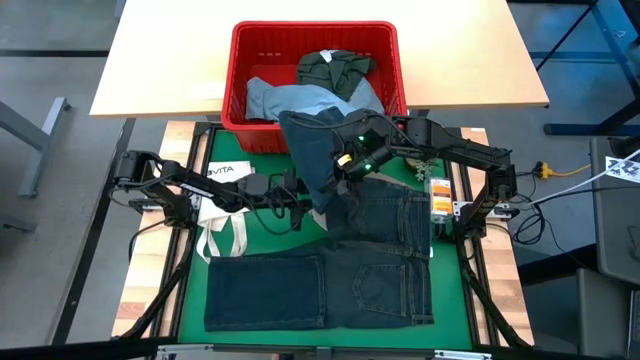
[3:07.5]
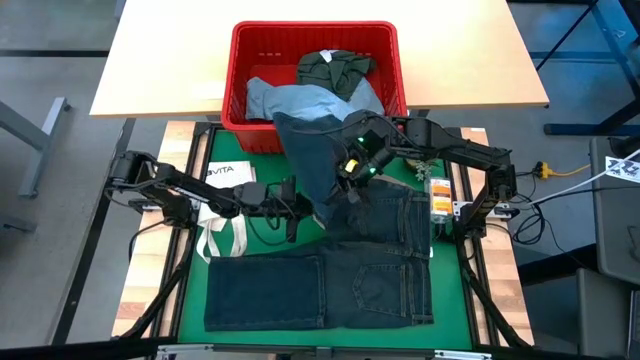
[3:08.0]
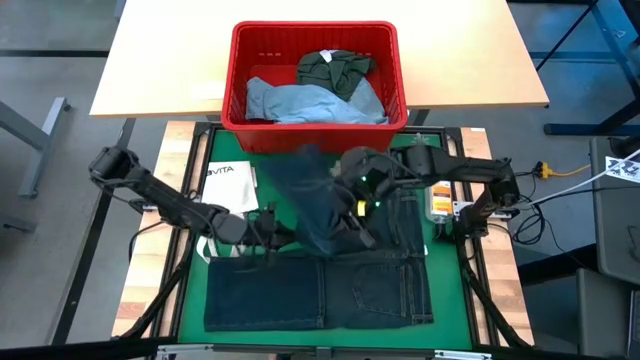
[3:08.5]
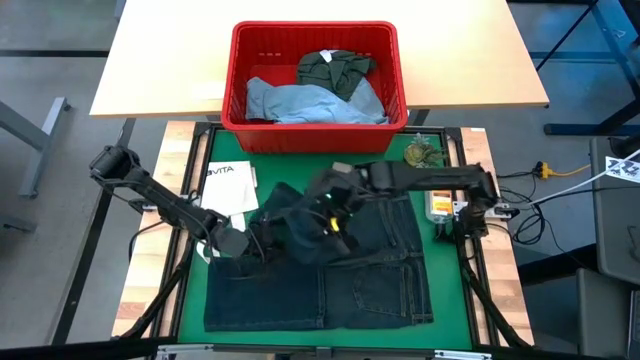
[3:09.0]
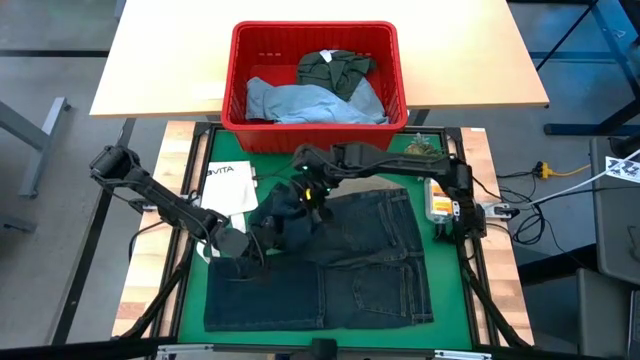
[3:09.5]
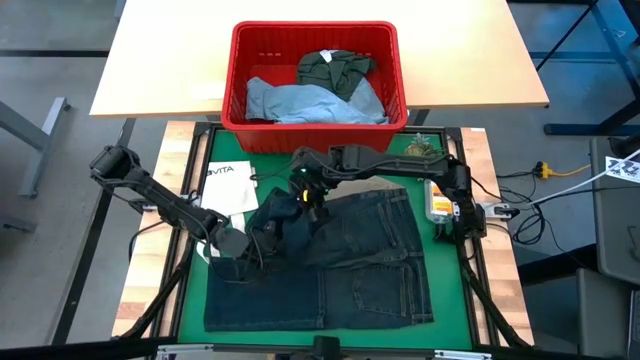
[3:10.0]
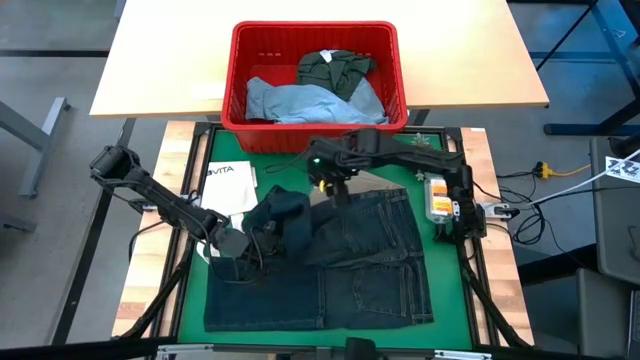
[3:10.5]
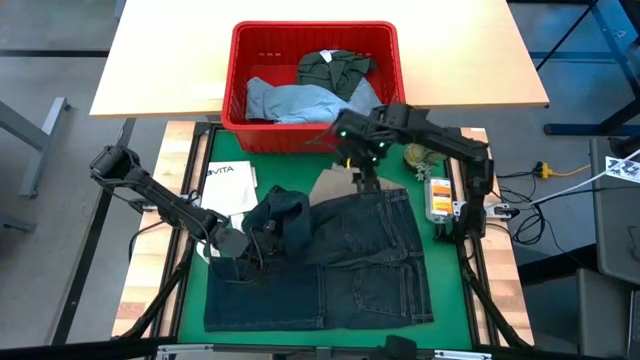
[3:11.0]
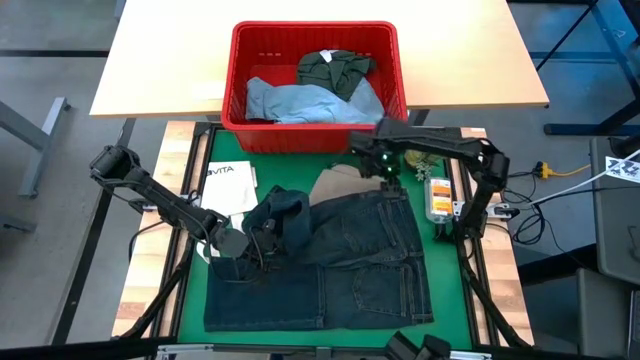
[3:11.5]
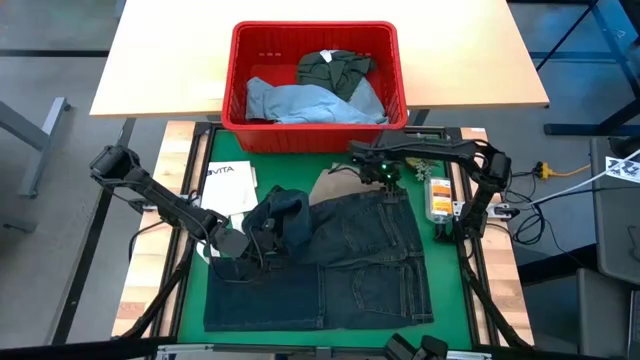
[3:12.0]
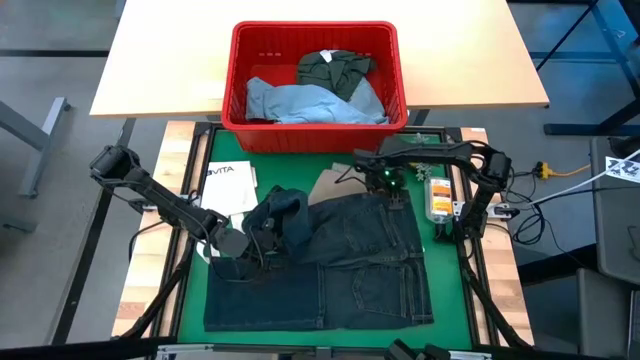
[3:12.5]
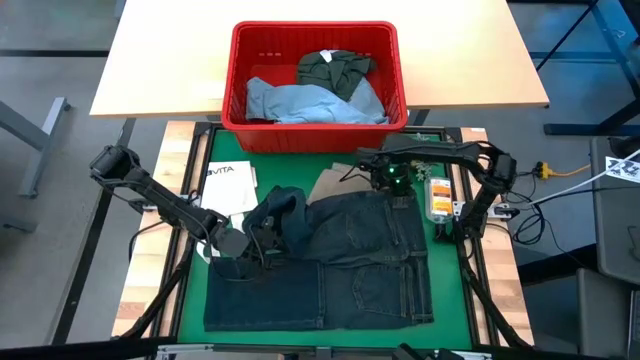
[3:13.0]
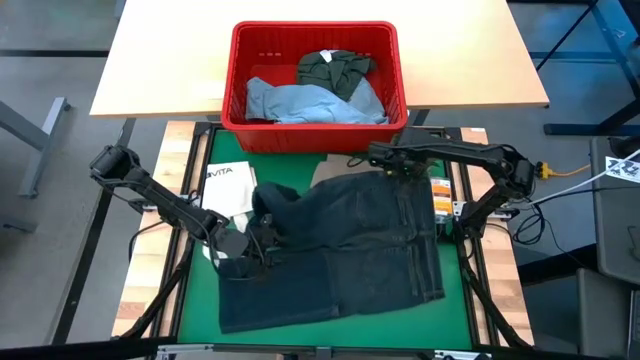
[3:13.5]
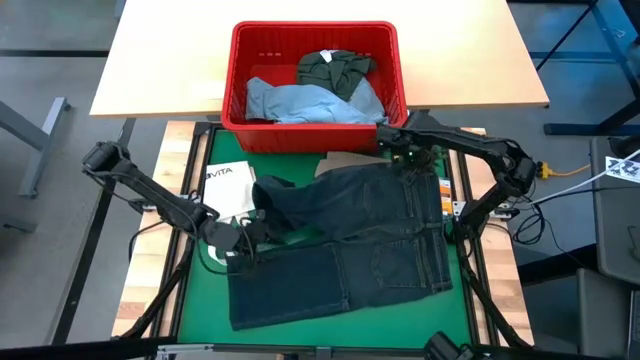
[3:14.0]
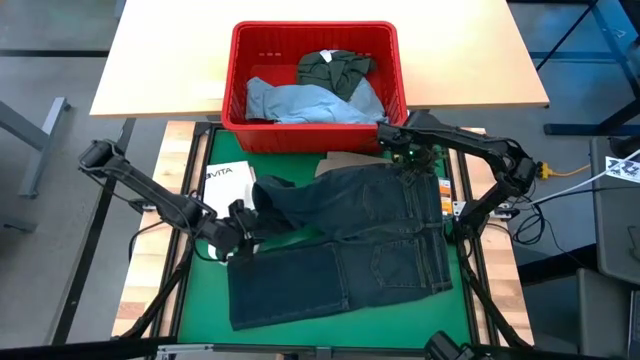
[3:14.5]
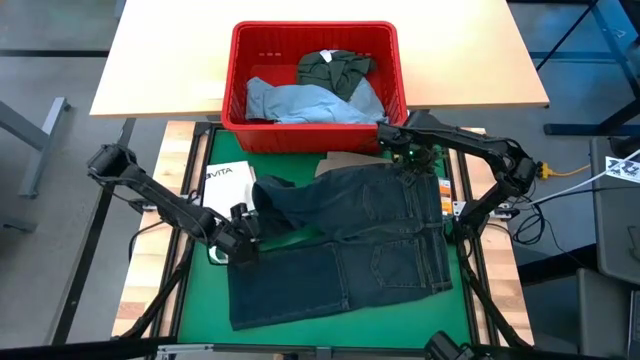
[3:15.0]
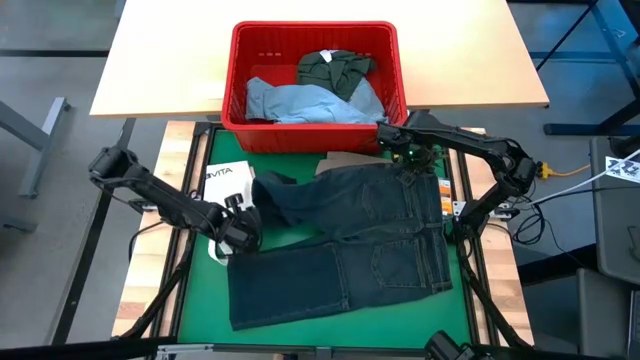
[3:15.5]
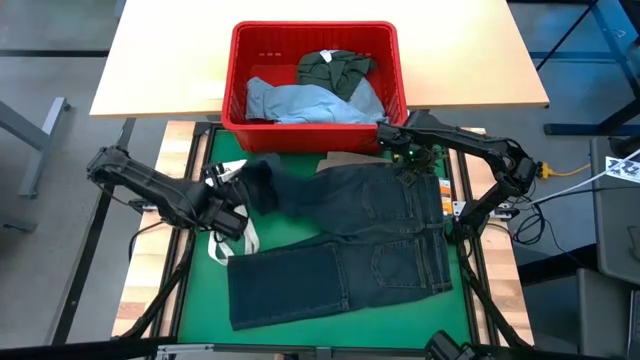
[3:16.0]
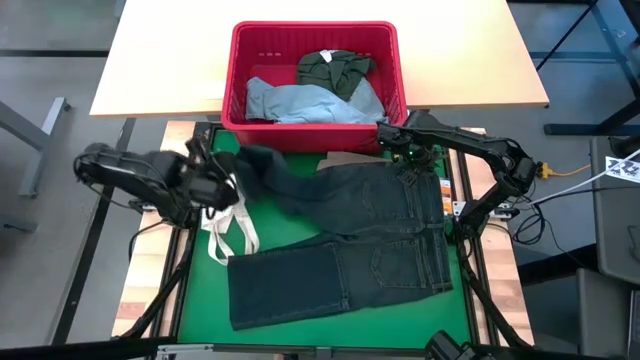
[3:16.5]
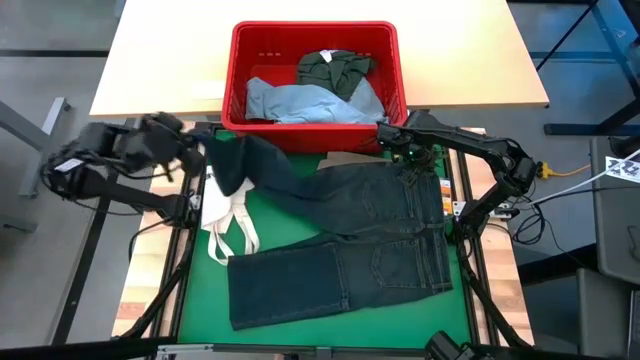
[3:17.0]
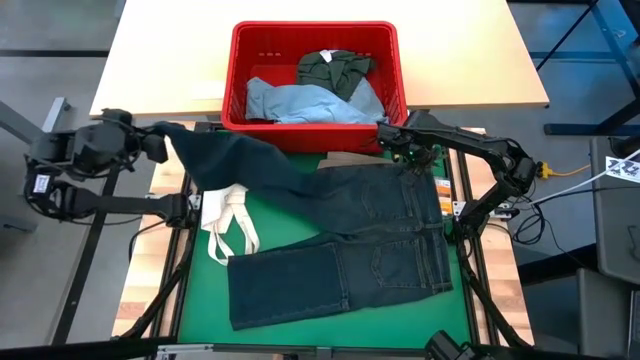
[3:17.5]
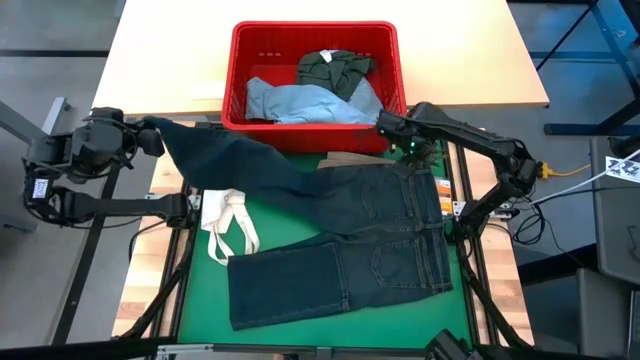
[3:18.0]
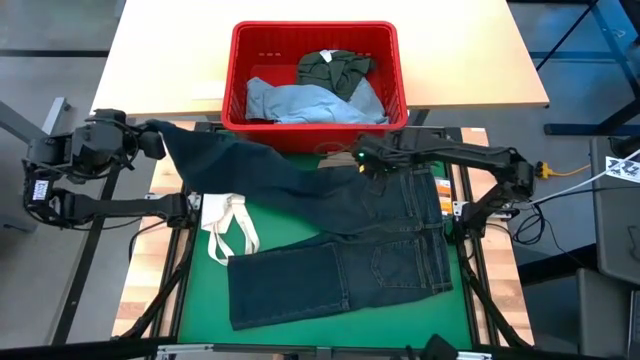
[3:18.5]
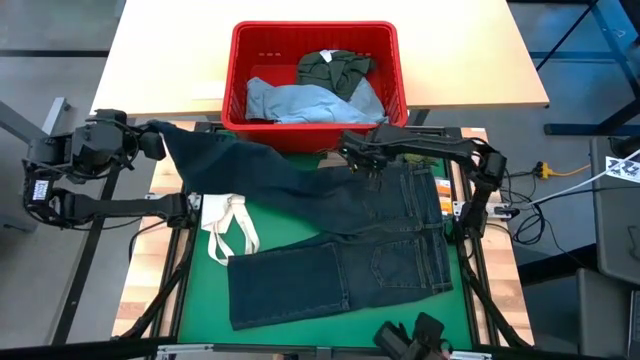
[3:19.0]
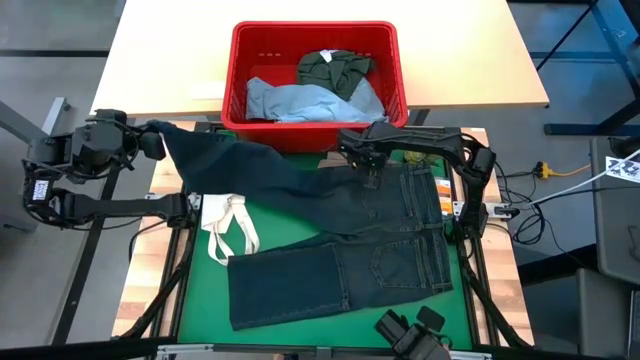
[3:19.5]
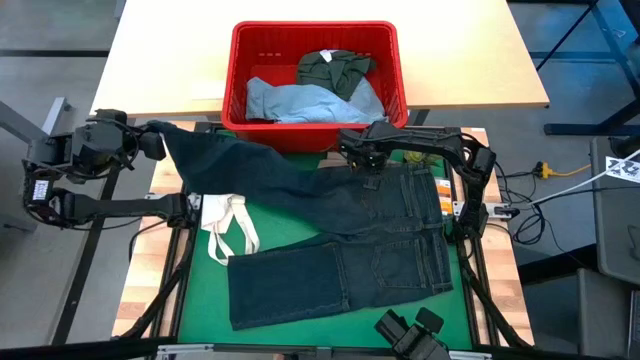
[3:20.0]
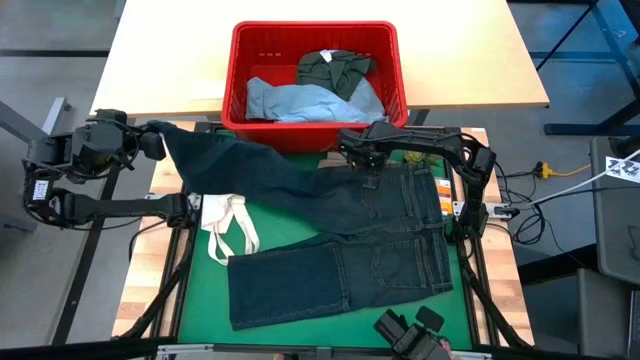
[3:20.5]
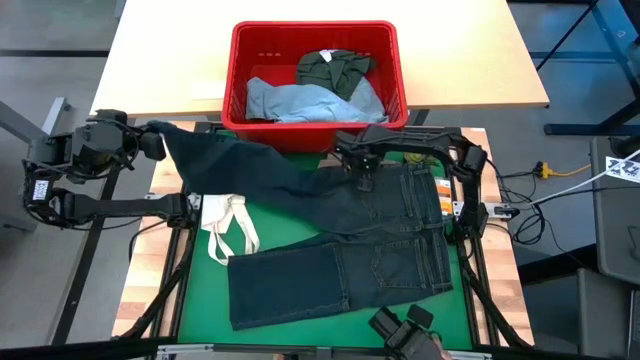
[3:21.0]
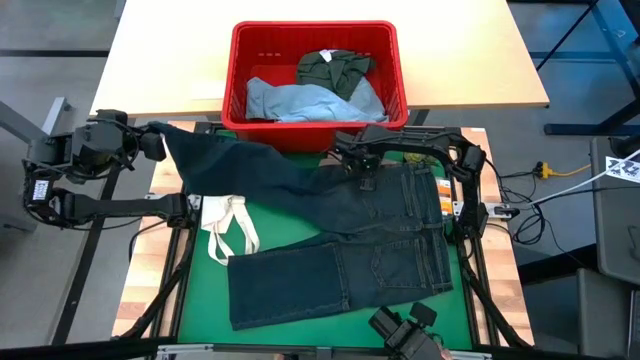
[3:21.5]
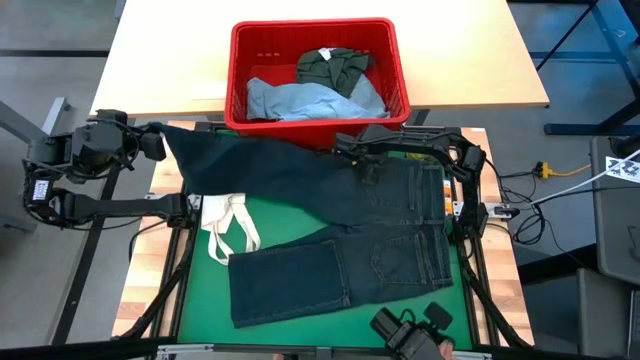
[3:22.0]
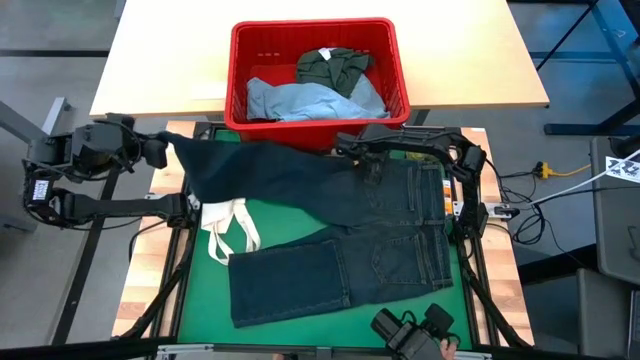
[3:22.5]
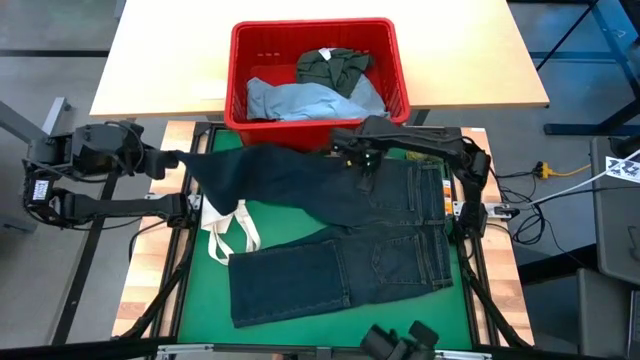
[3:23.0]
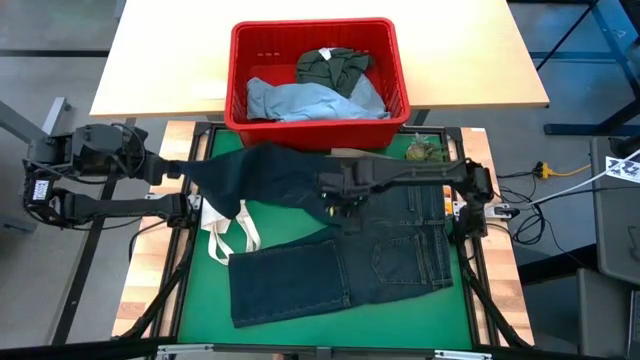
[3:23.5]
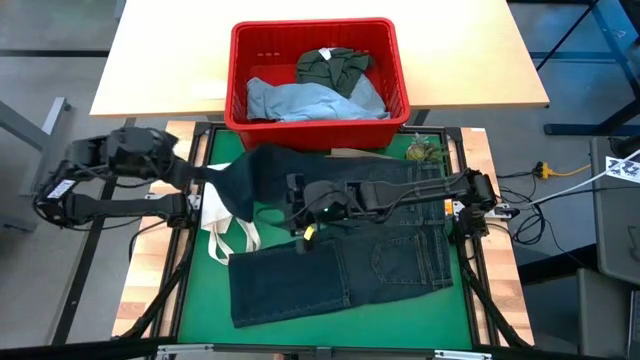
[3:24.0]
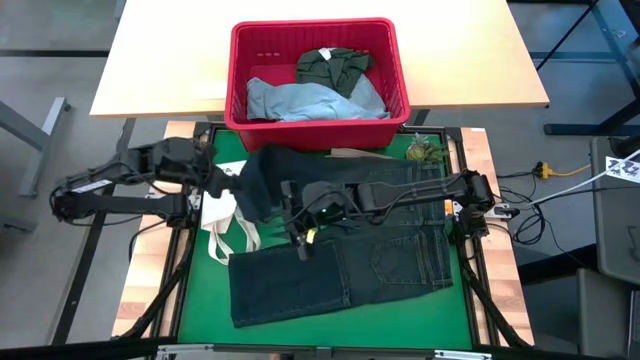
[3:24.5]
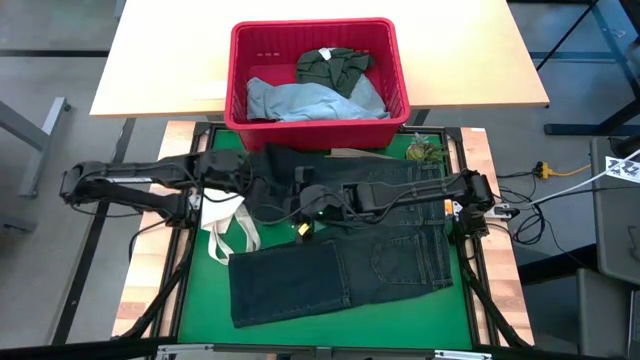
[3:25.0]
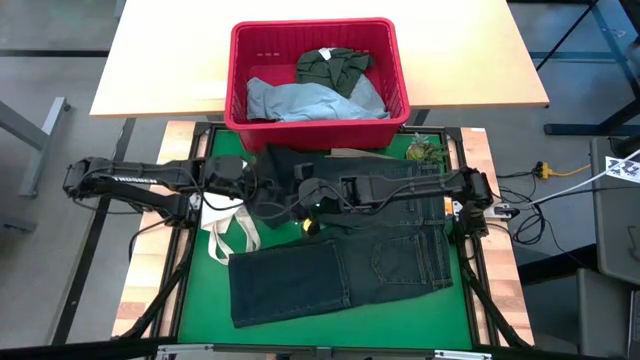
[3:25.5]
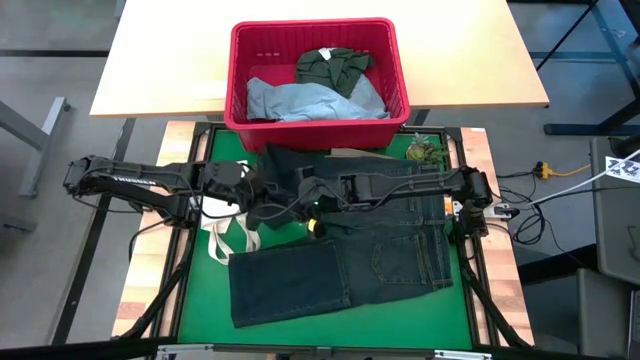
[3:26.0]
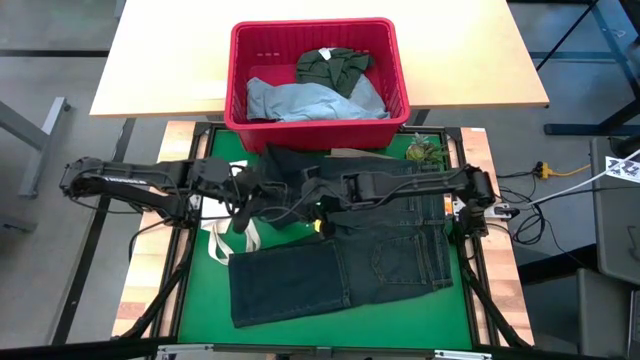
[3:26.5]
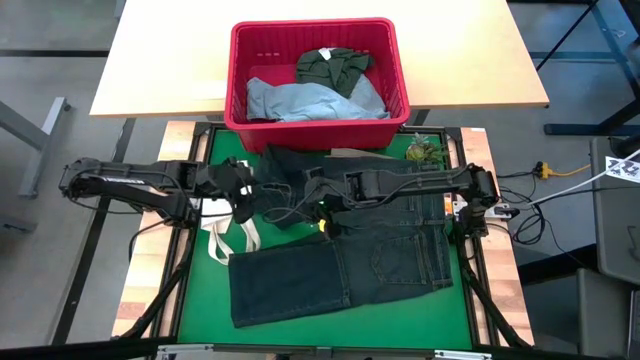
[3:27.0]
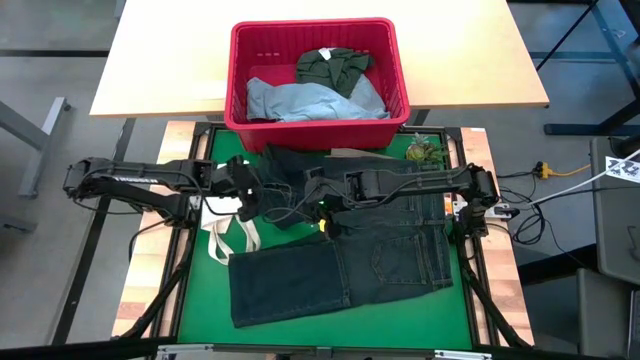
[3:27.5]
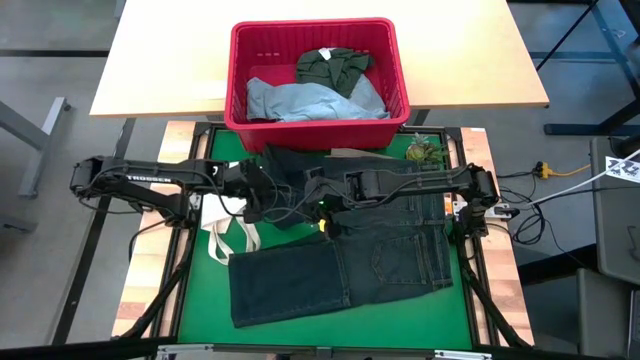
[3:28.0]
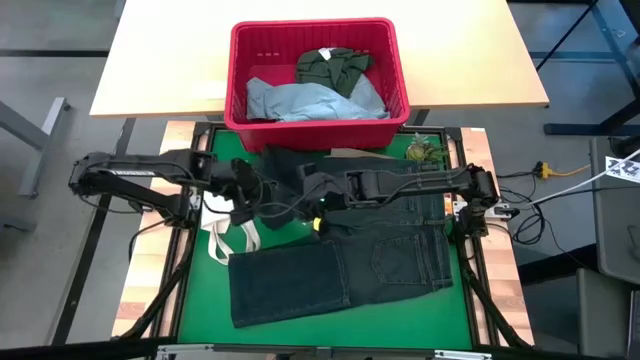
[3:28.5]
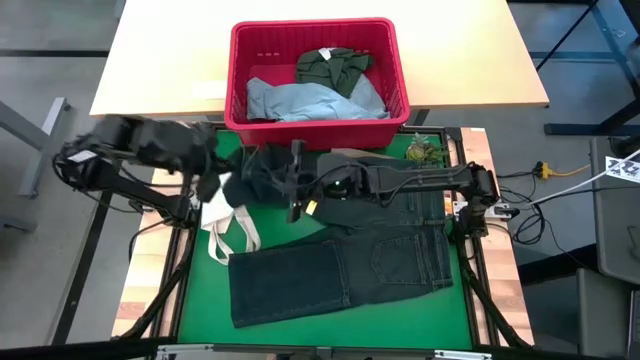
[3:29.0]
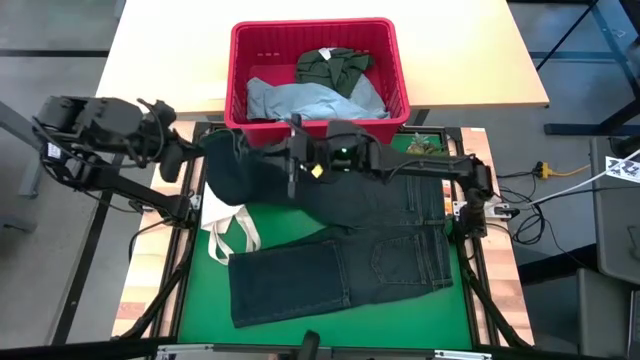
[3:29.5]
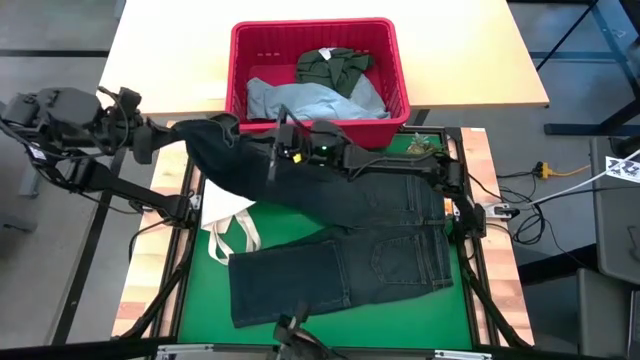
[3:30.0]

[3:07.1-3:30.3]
Task: Fold Laundry from Bin
Fold the dark blue jeans
